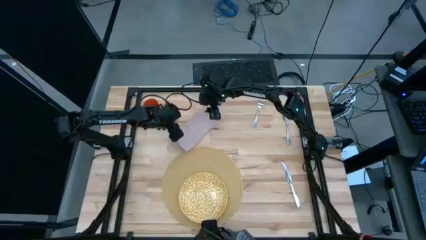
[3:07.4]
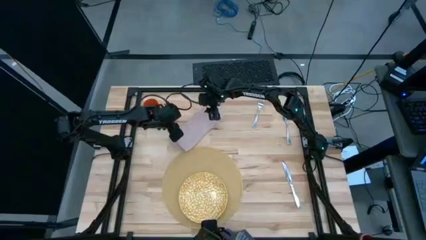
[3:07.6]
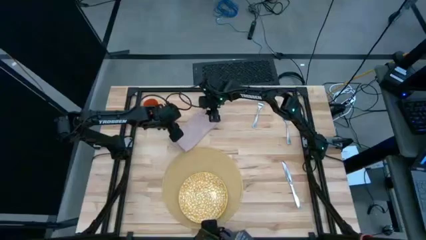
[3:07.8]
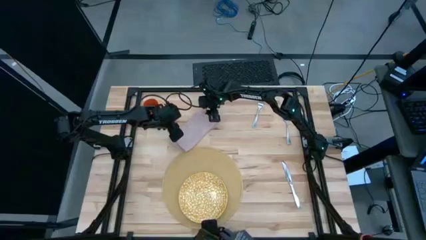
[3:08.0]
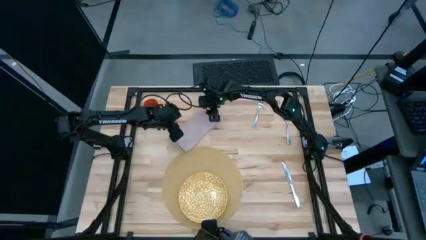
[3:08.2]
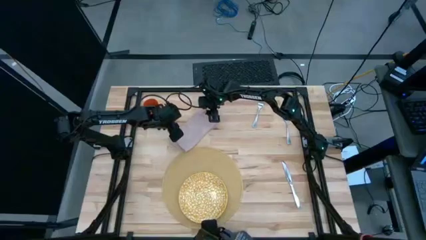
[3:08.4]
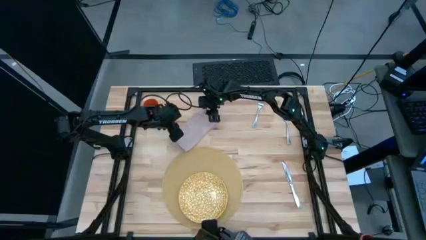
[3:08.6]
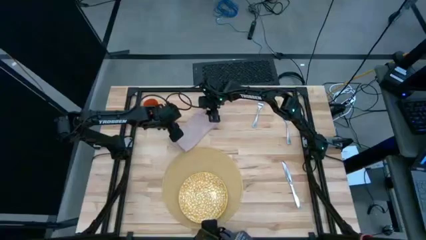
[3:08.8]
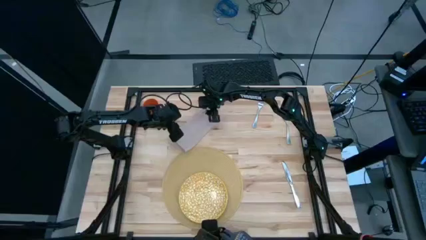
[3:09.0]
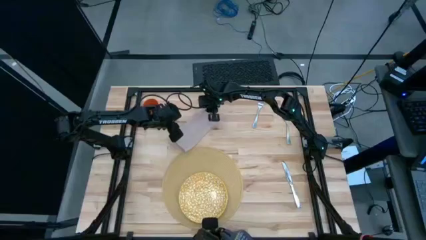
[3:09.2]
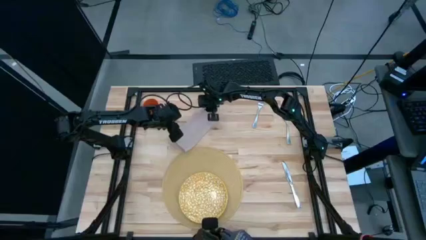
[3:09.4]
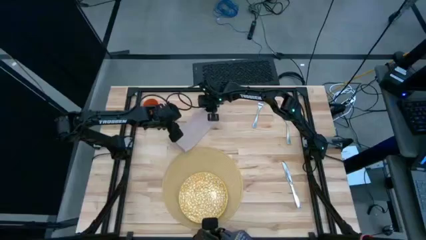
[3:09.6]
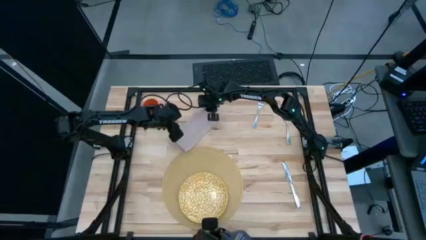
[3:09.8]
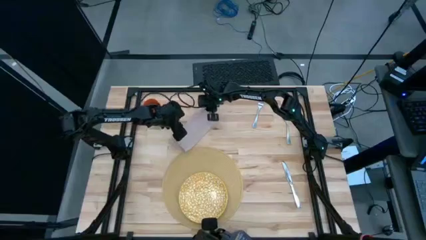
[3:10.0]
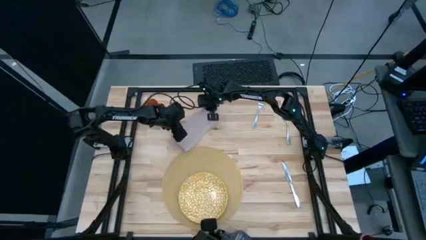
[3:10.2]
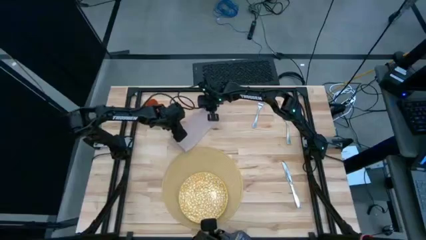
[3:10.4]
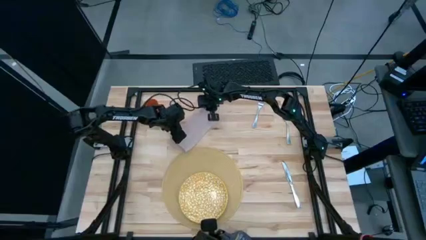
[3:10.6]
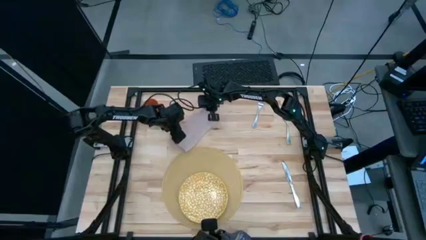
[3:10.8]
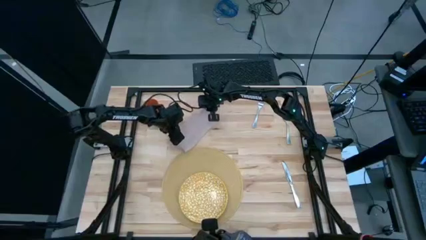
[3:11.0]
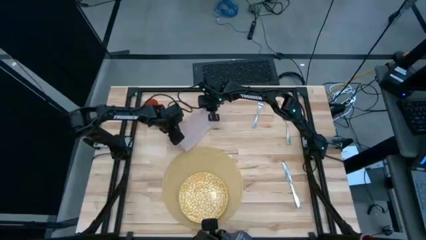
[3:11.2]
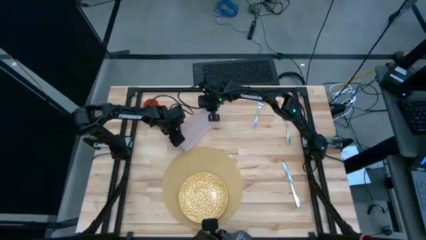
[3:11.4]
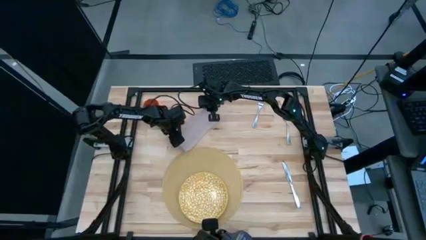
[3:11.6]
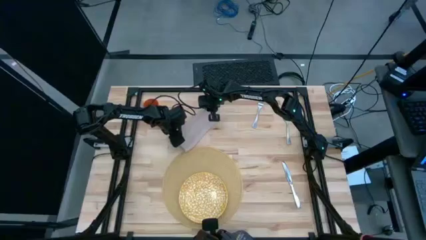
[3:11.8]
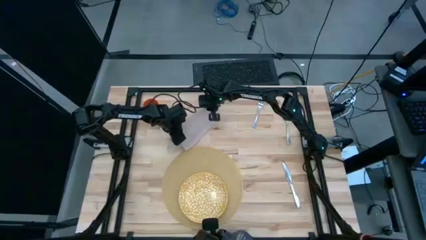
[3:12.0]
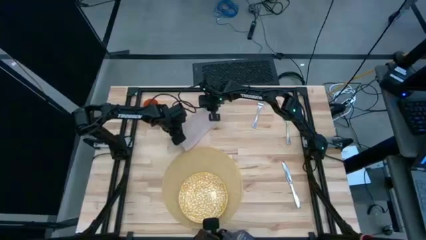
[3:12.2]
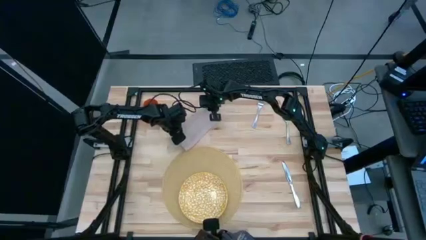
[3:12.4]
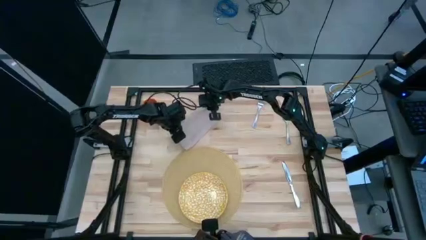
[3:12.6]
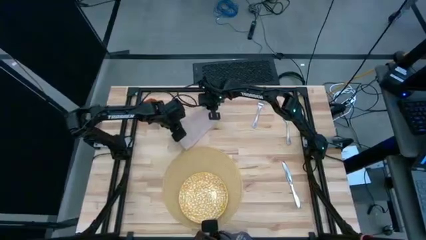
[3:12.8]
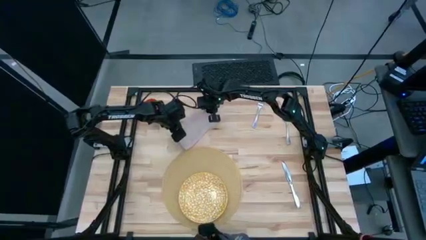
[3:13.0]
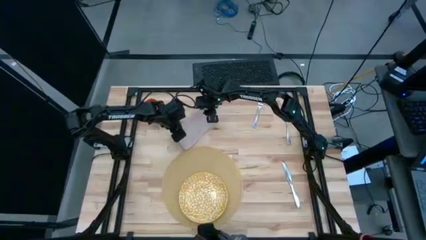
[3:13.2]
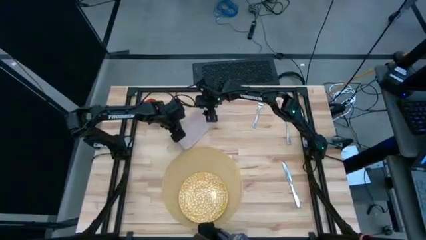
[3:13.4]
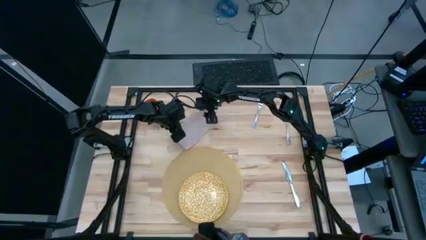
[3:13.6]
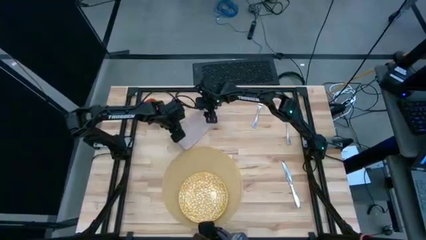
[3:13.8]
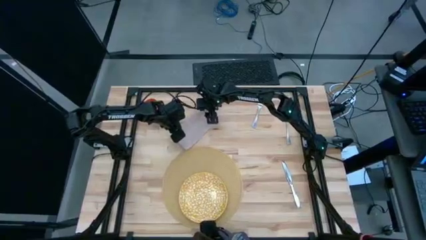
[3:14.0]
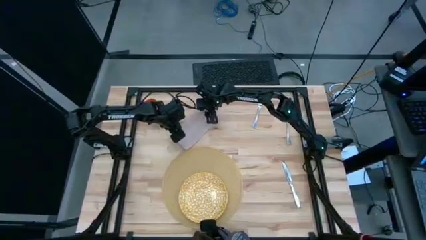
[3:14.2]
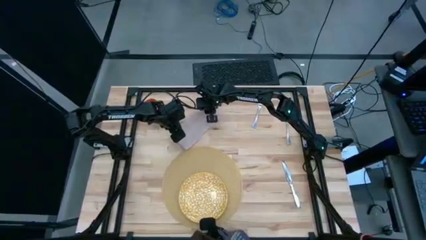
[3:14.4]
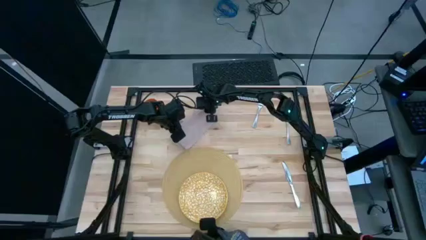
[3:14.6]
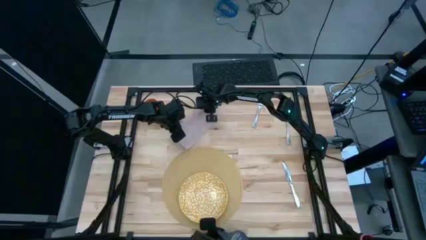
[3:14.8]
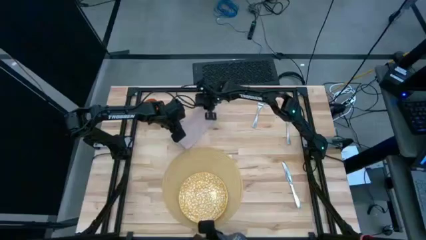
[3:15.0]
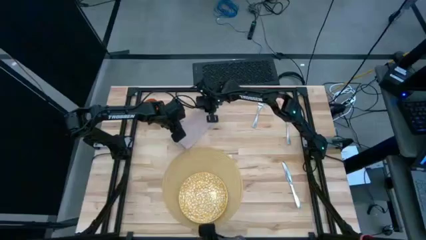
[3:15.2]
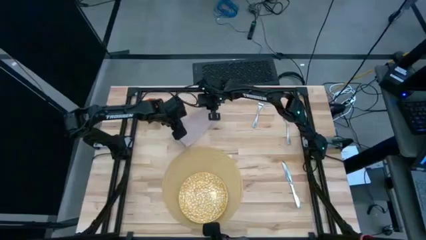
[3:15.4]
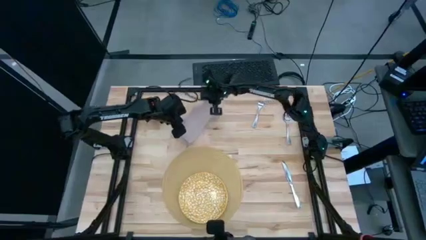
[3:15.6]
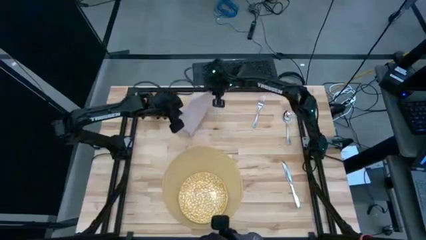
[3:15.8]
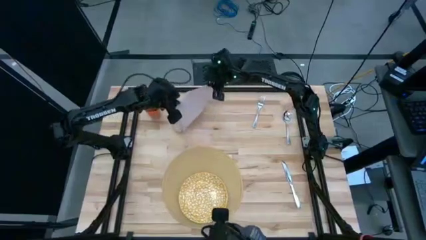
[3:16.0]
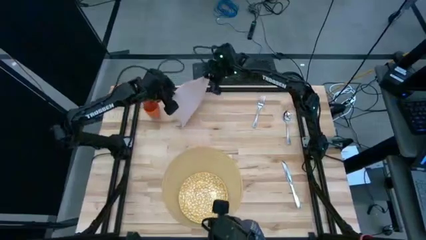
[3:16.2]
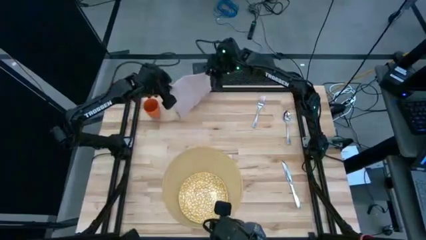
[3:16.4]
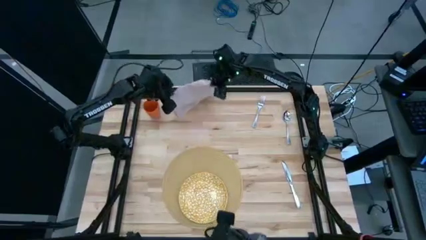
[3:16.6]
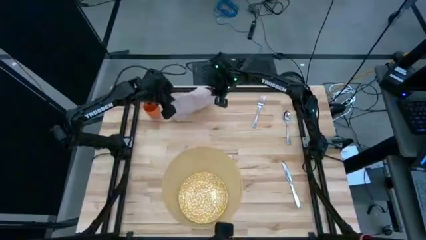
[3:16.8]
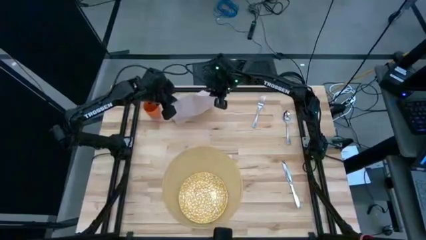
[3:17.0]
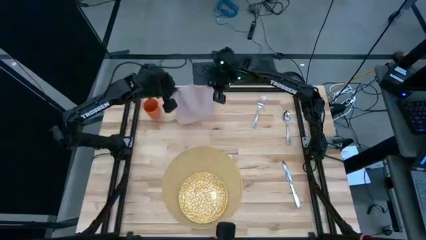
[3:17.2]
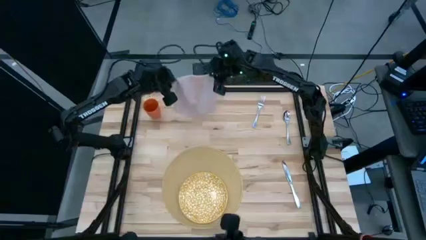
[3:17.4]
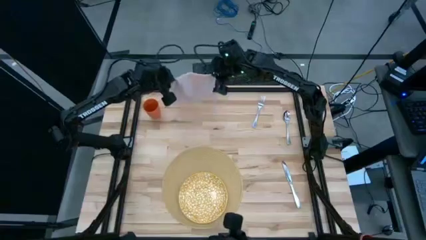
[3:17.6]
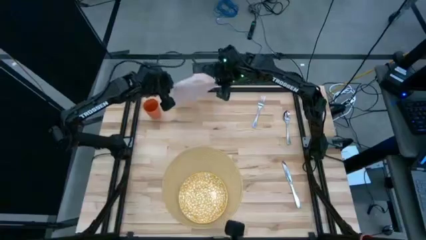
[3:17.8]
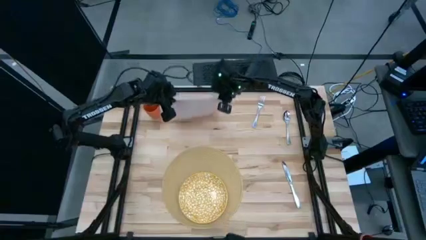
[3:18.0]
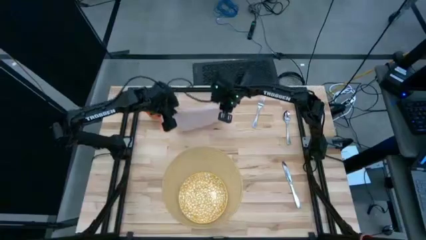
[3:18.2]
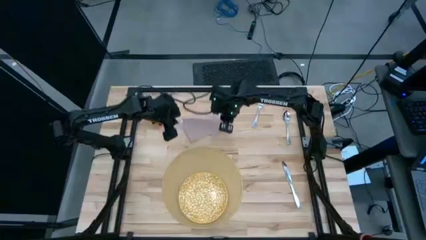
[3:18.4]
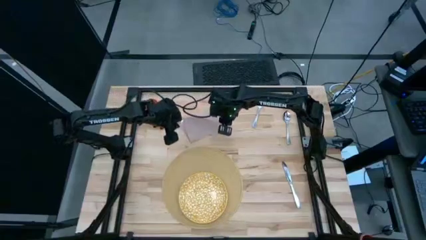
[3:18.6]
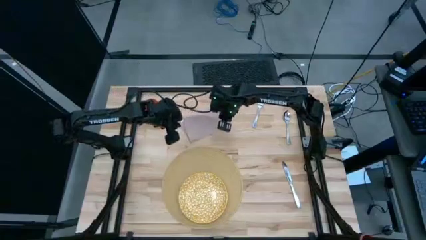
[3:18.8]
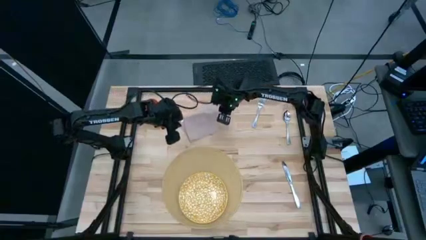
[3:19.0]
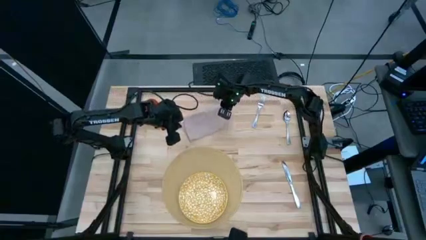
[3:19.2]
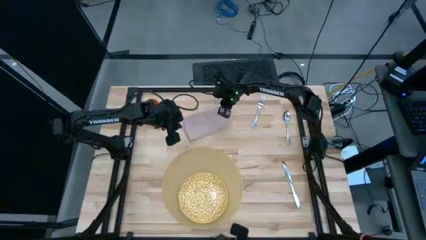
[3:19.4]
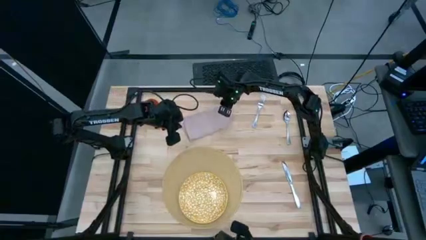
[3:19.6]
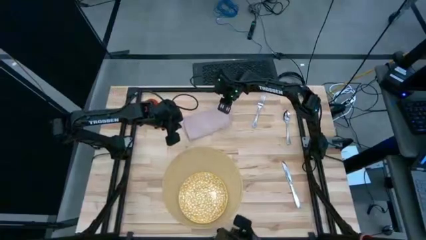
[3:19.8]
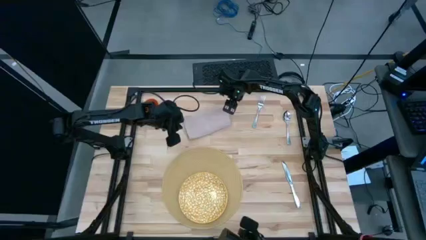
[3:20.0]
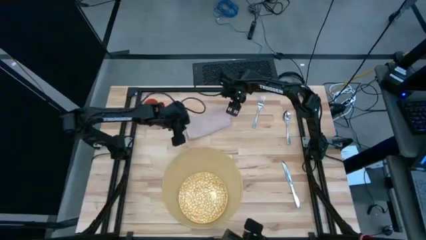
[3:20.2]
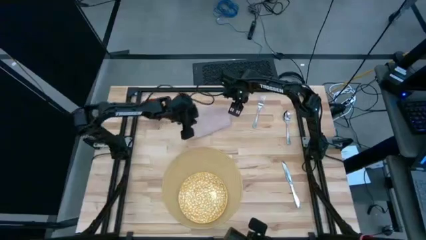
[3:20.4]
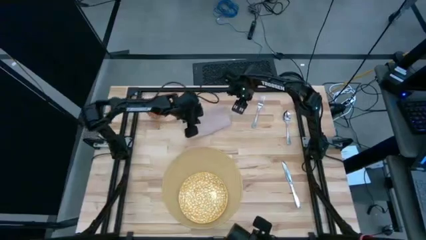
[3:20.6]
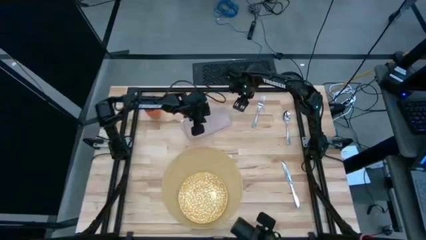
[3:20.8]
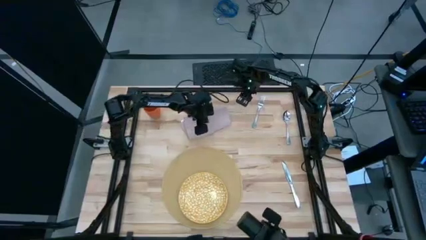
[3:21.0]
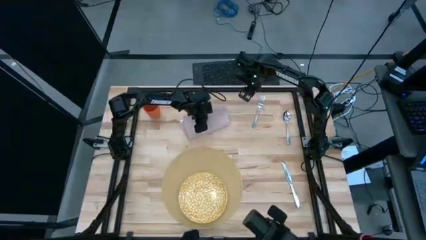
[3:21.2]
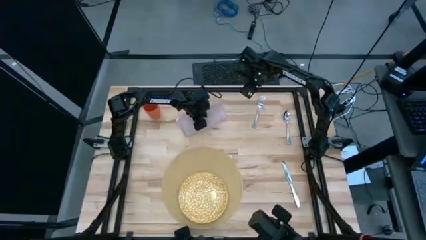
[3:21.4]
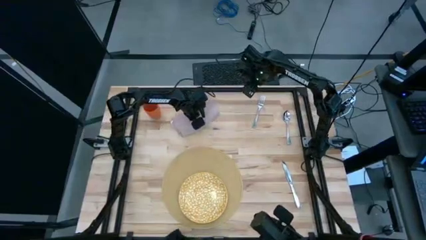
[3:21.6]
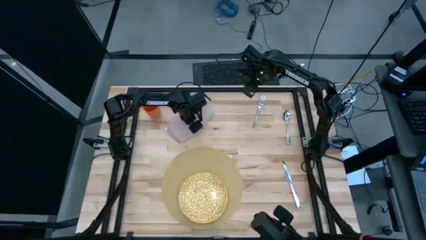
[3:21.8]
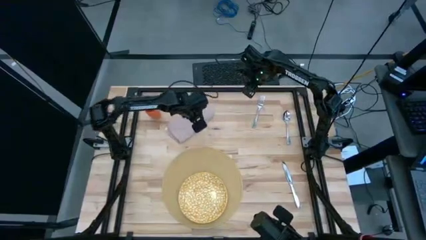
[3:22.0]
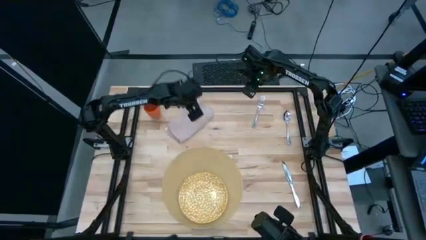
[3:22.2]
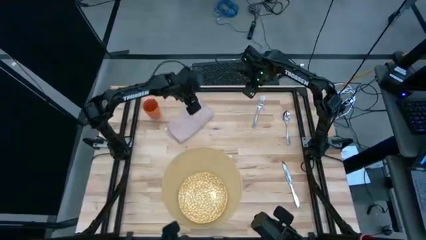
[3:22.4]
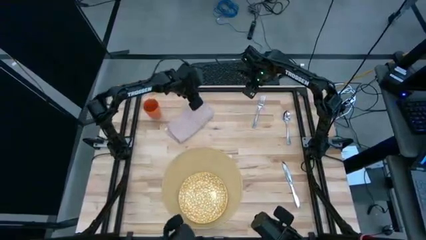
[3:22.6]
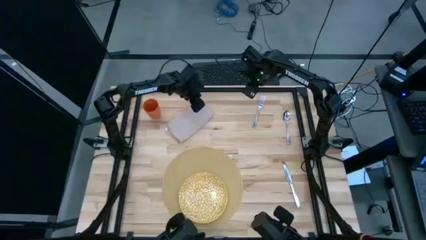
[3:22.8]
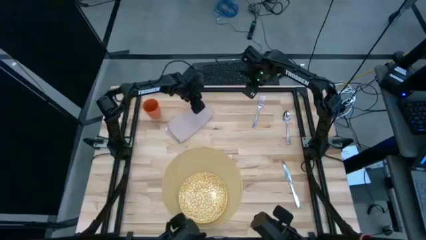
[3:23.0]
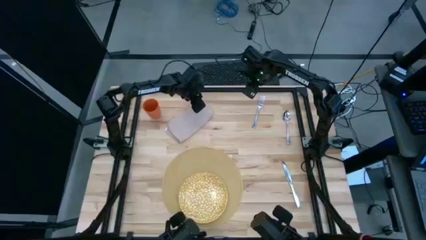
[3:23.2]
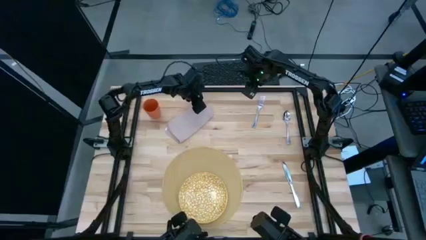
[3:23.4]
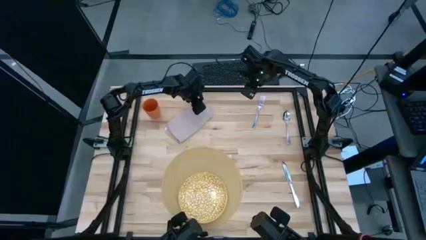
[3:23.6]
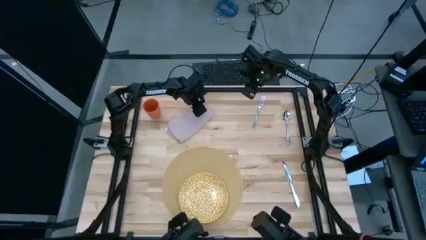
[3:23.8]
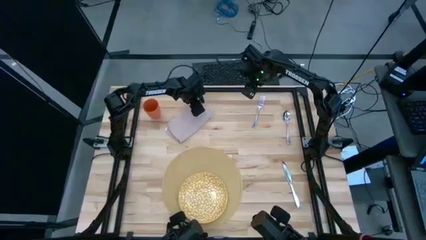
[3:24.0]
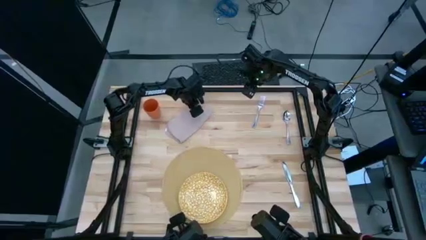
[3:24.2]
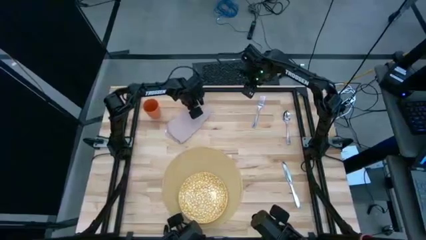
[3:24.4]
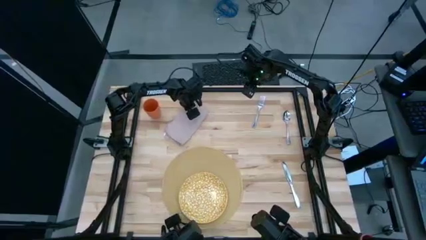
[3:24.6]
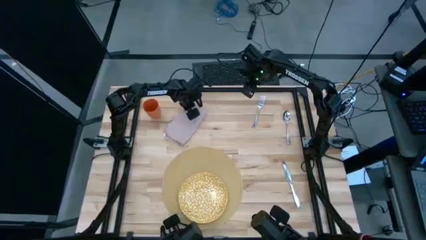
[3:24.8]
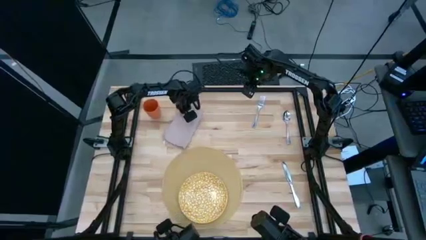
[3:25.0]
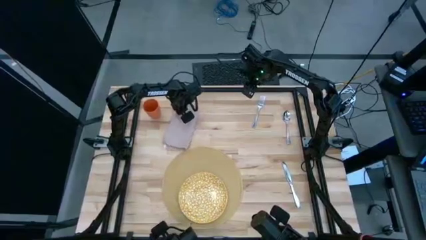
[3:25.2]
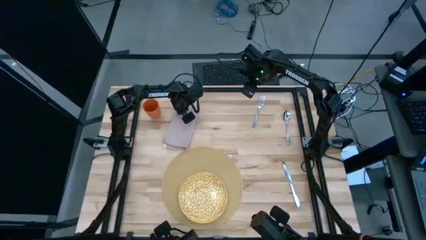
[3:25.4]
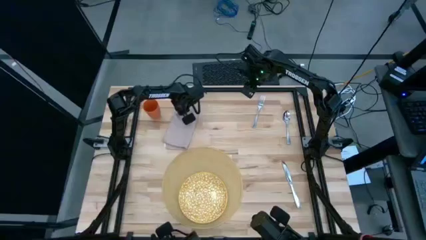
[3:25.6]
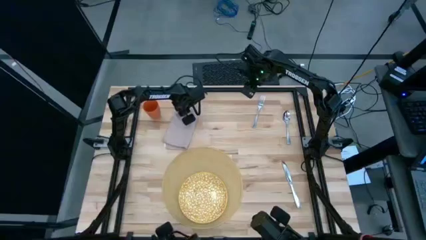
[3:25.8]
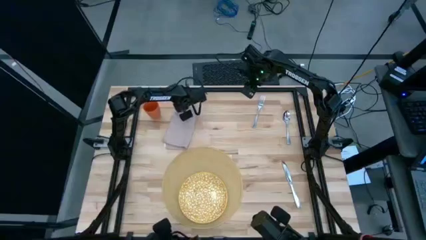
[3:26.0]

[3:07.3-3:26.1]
Task: Set table place
Fold the light orange napkin on the table
